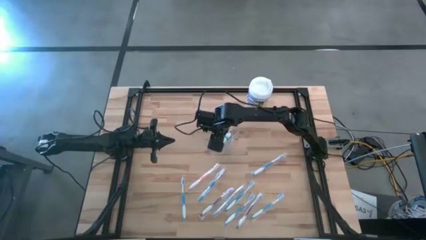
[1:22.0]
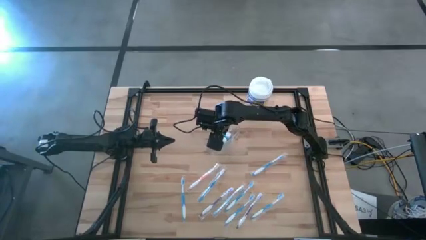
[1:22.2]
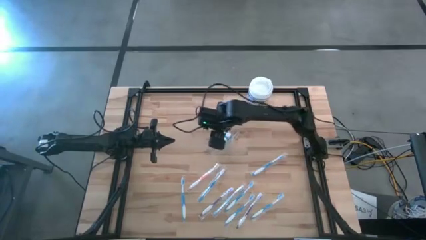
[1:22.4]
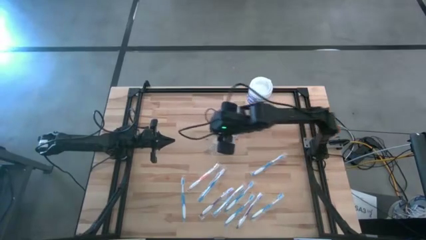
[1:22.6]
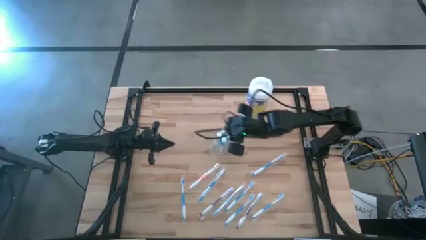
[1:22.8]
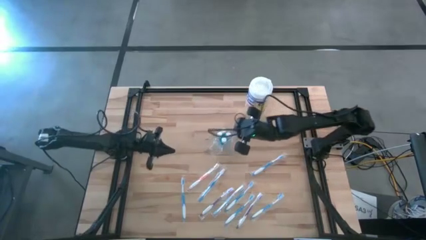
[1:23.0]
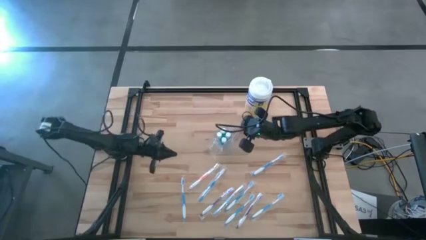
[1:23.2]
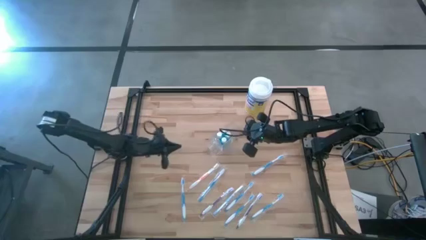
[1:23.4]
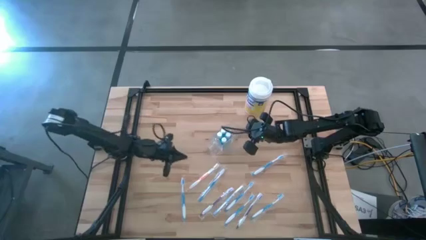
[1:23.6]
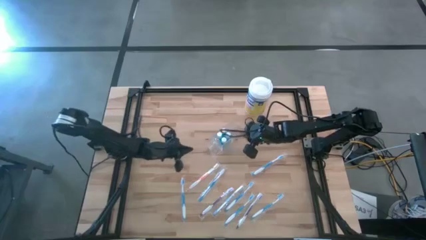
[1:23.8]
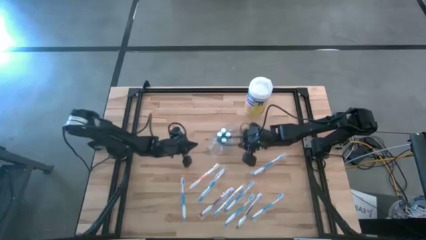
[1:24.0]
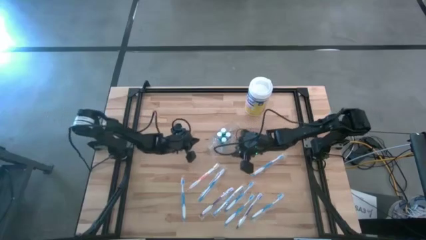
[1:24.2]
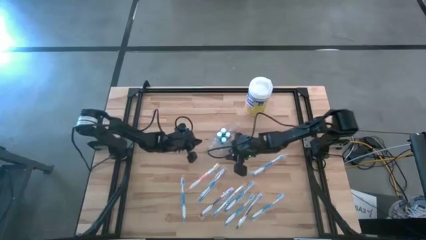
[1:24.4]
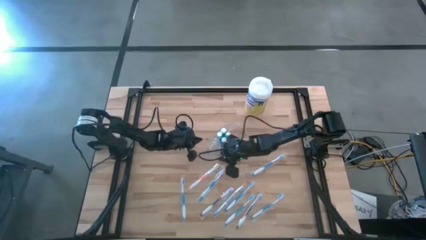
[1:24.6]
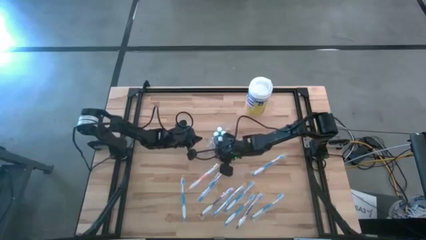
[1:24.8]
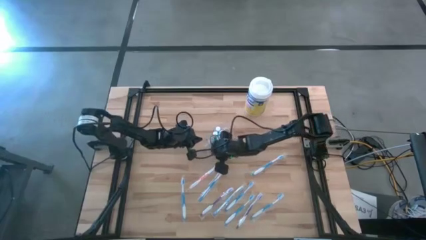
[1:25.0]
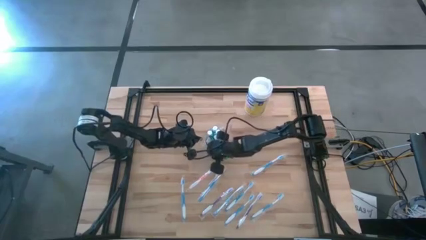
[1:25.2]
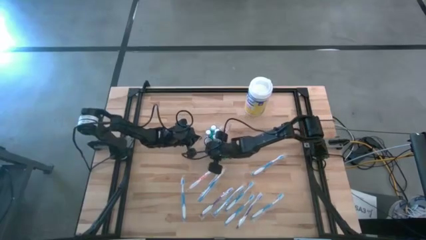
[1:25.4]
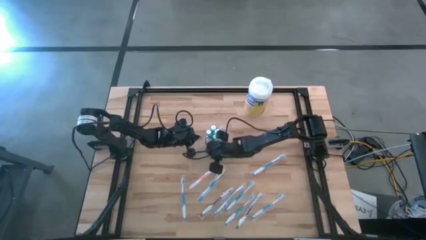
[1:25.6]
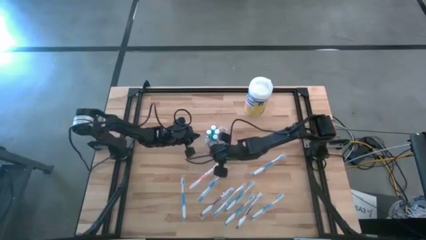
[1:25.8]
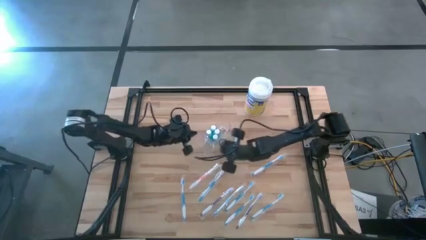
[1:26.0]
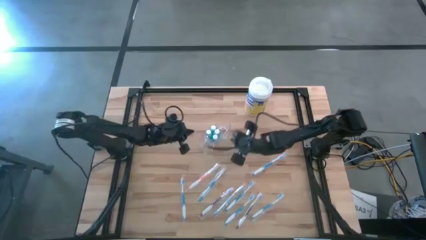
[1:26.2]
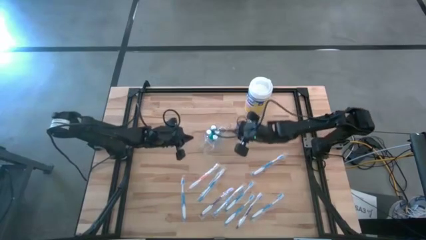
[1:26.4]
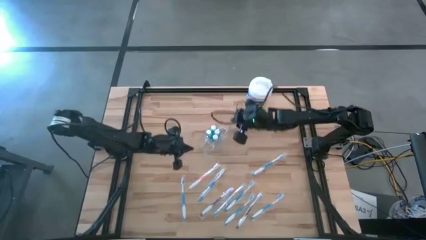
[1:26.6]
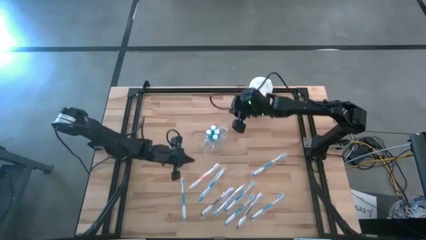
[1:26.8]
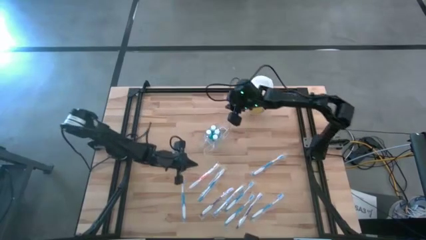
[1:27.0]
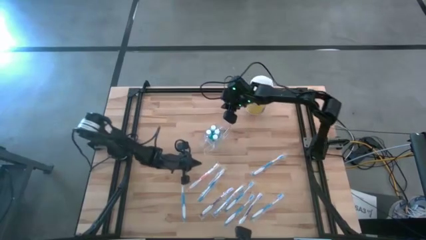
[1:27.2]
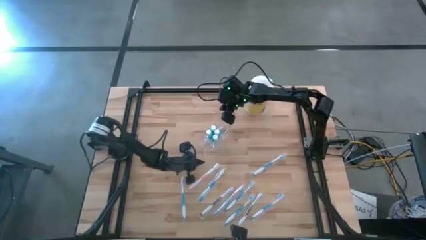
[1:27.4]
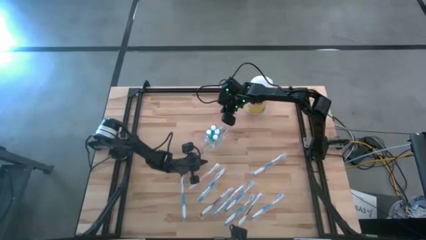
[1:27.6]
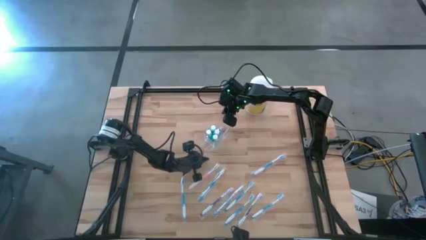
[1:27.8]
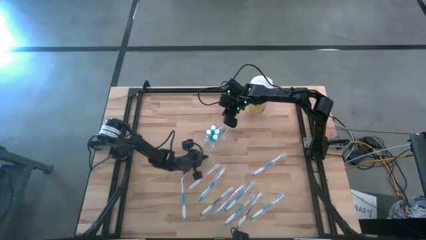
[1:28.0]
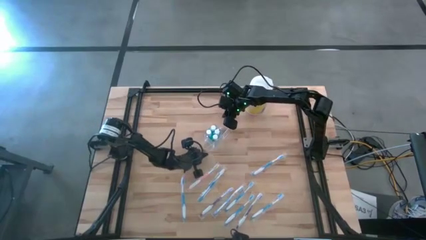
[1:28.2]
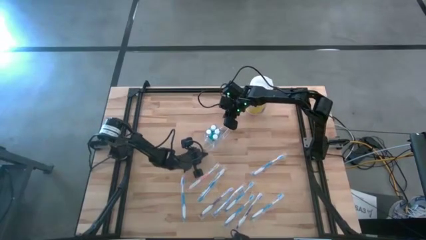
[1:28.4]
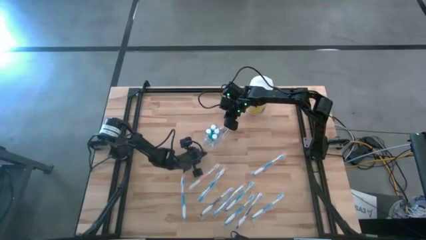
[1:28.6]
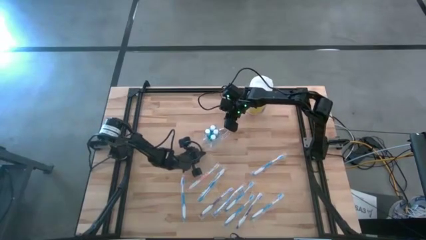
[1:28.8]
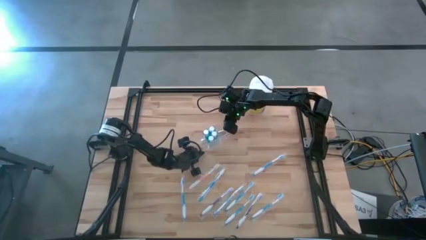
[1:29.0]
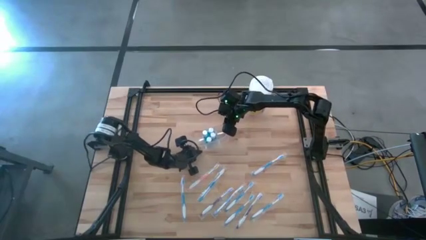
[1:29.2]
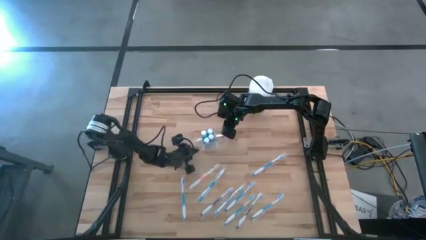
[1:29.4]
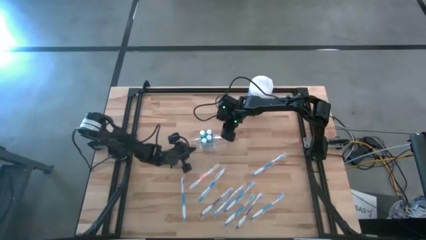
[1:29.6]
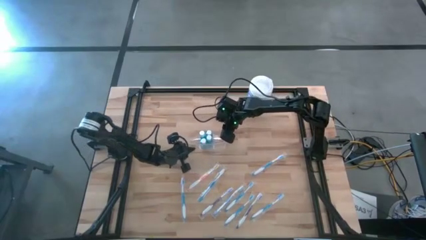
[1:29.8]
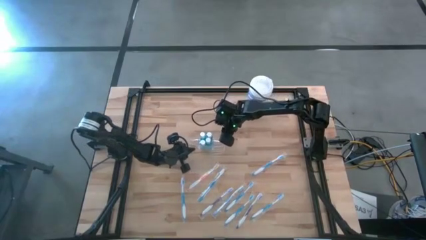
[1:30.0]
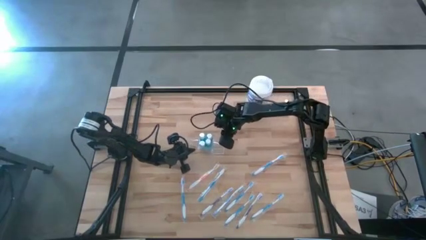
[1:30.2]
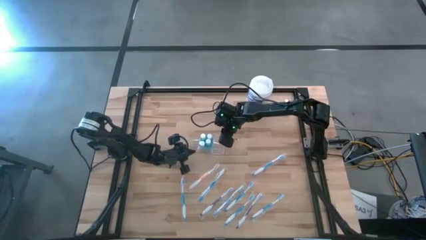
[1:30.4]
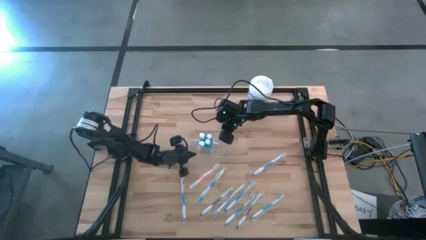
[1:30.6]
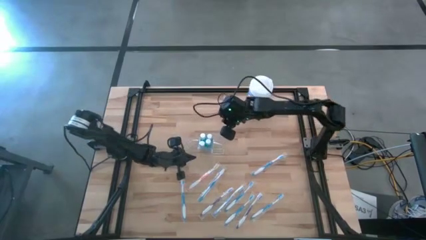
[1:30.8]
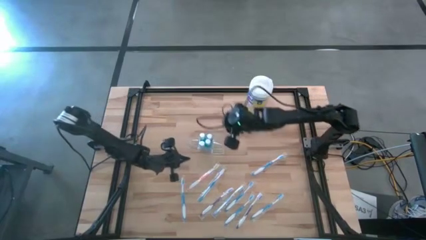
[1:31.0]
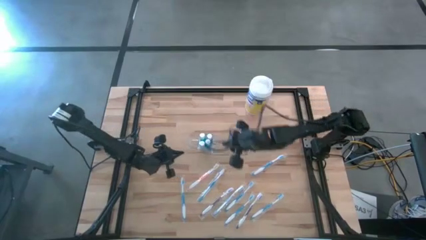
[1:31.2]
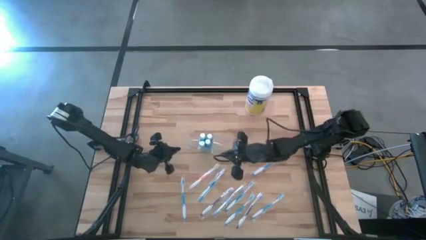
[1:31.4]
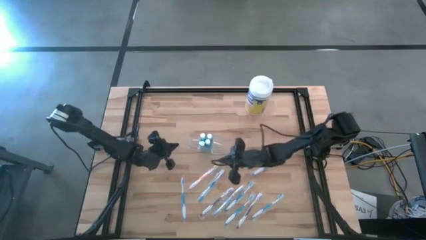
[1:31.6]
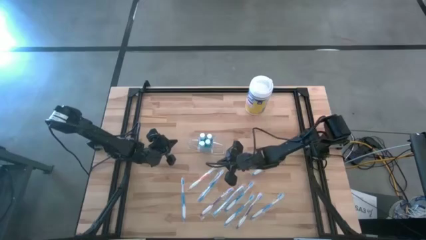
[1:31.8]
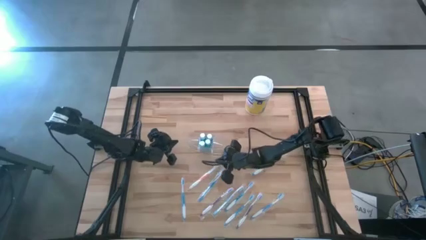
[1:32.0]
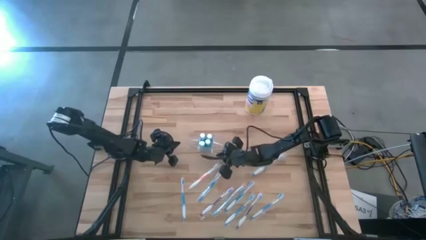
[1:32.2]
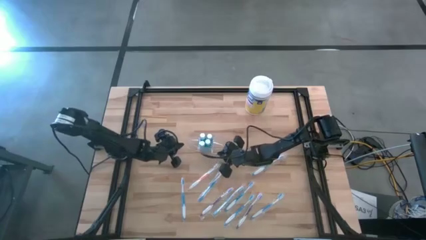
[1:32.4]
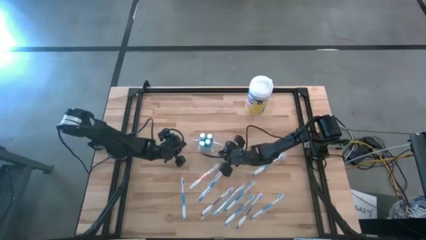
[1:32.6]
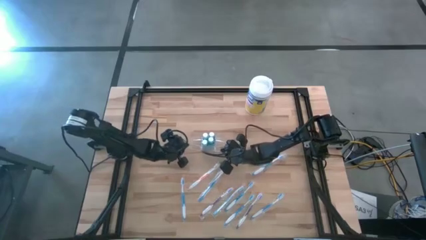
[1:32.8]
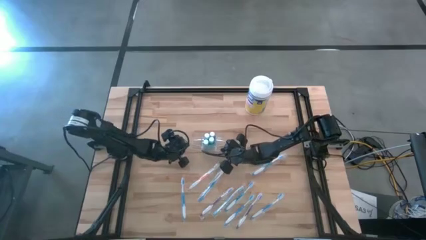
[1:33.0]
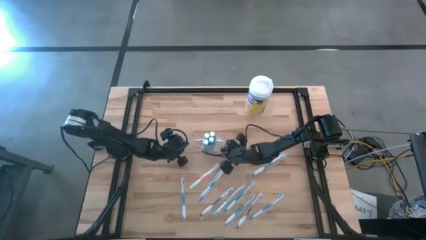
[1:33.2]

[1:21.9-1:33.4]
Task: Pick & Place toothbrushing station
Adjust the transparent organizer

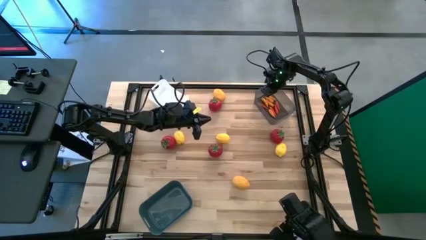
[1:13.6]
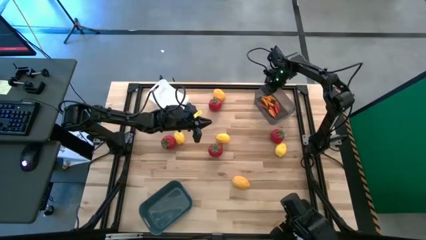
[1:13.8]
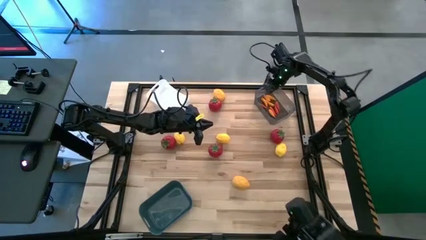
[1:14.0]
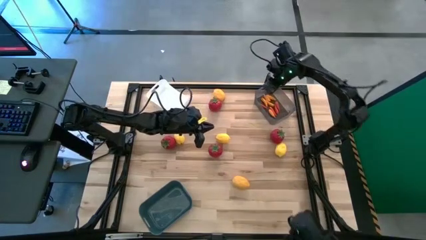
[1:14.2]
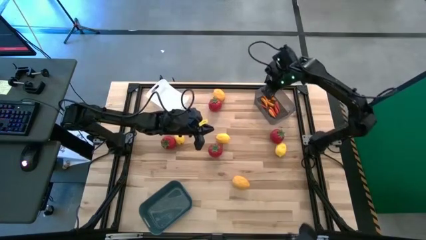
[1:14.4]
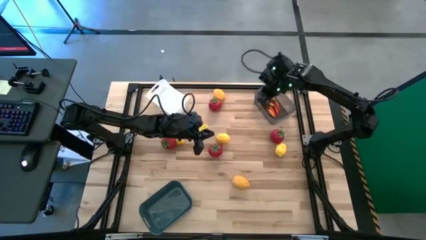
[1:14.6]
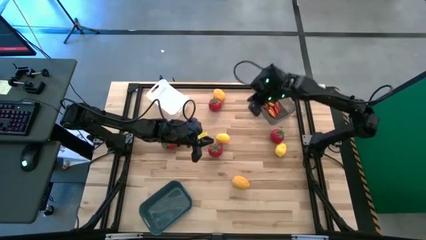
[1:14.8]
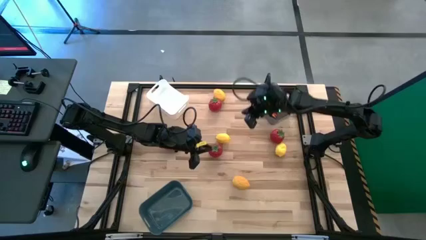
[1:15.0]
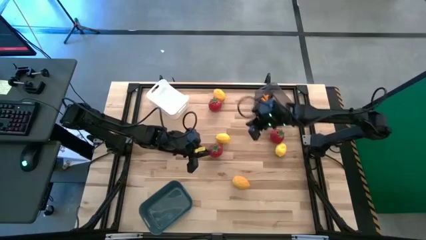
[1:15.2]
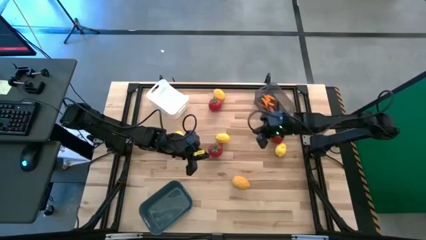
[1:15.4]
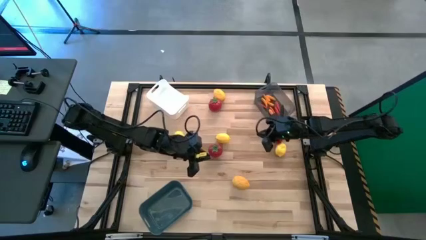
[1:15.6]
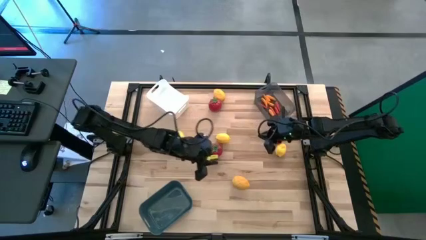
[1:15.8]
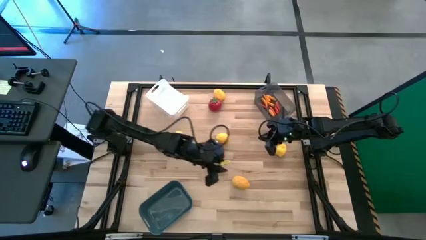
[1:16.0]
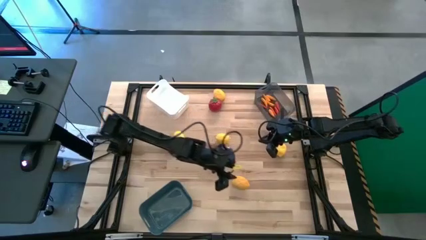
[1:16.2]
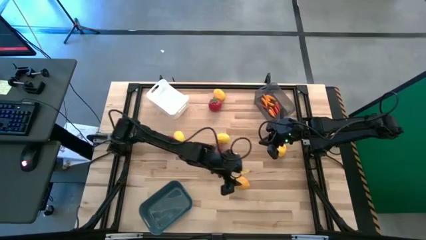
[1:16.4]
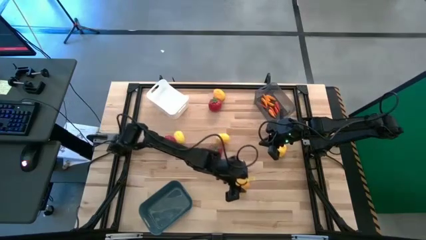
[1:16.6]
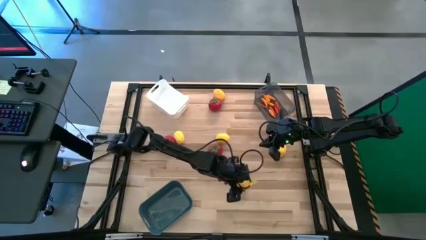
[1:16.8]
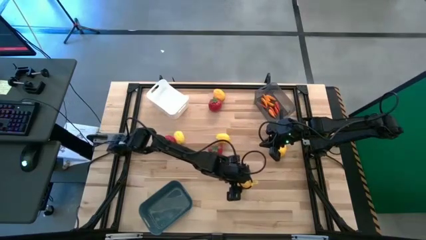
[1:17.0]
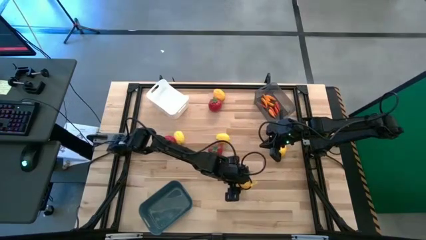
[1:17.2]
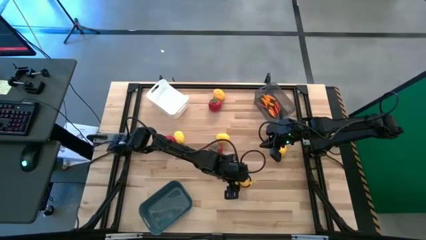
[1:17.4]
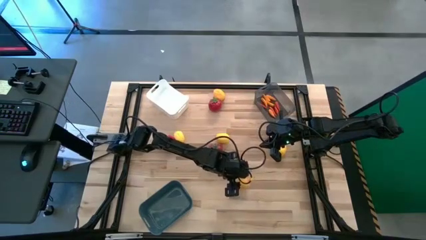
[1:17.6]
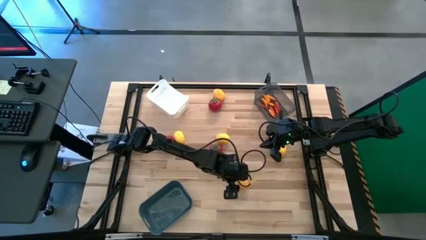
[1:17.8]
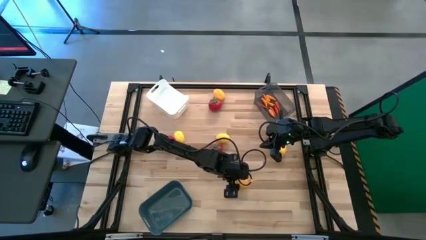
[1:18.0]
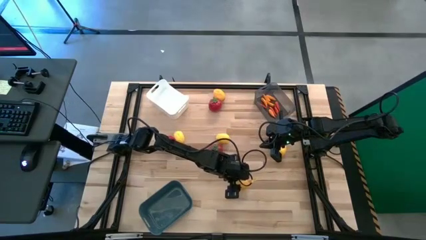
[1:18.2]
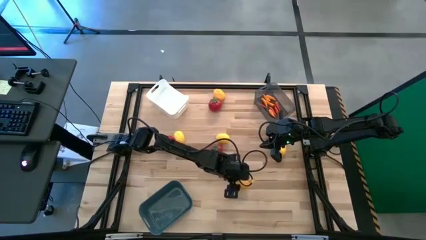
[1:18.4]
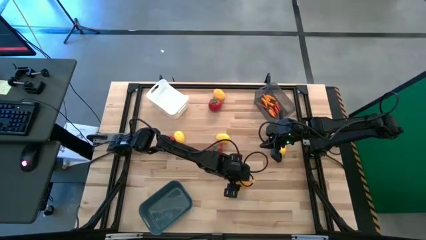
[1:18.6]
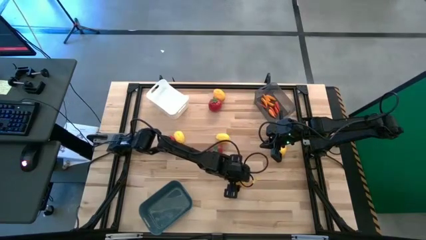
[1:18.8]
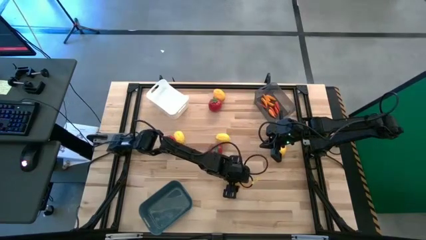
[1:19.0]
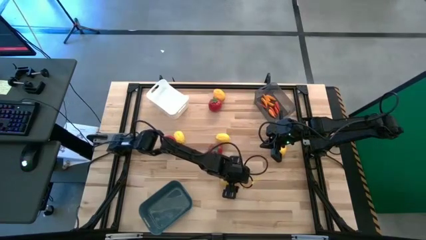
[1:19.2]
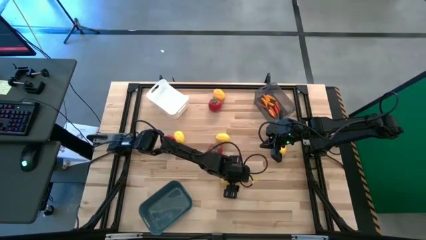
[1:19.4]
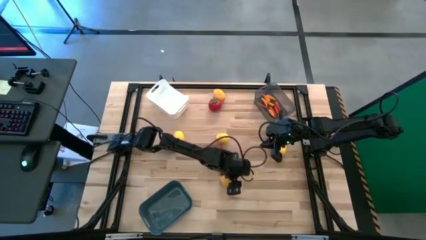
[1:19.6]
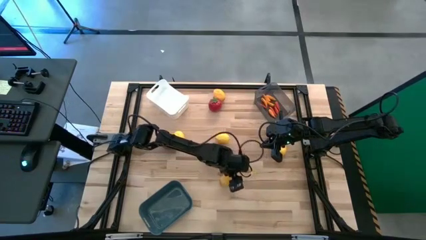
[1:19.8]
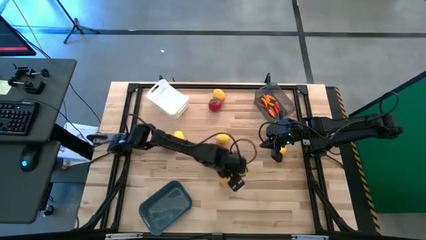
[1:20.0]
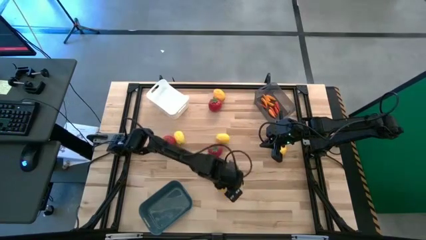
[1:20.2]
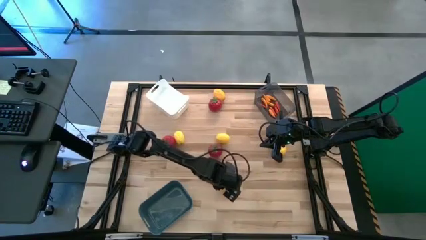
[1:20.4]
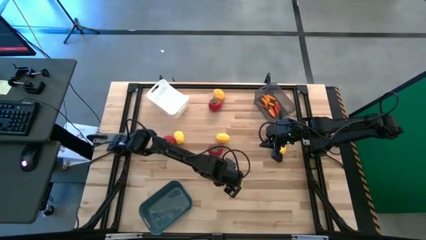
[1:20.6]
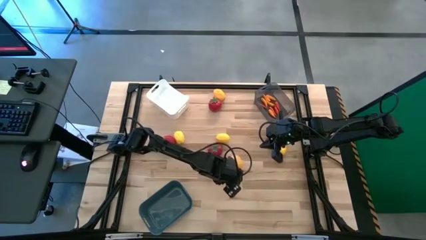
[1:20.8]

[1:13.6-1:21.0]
Task: Sort produce into baskets
Put the lemon into the blue bin
